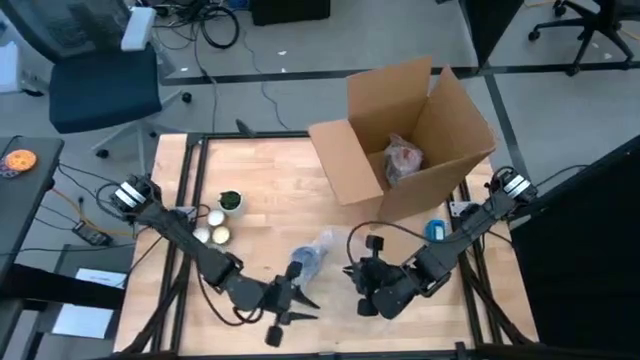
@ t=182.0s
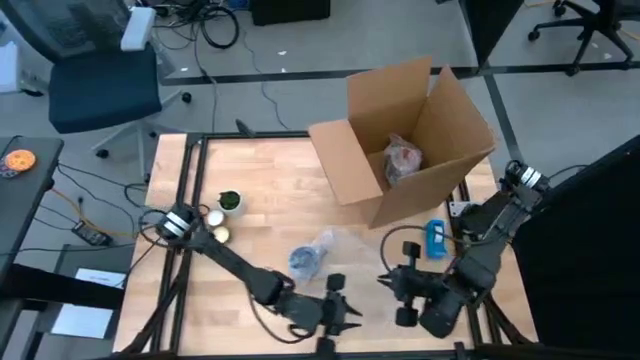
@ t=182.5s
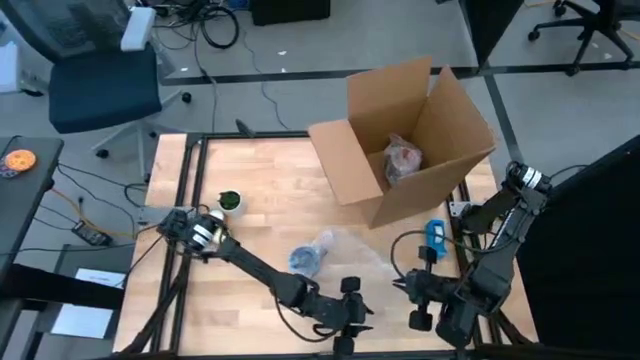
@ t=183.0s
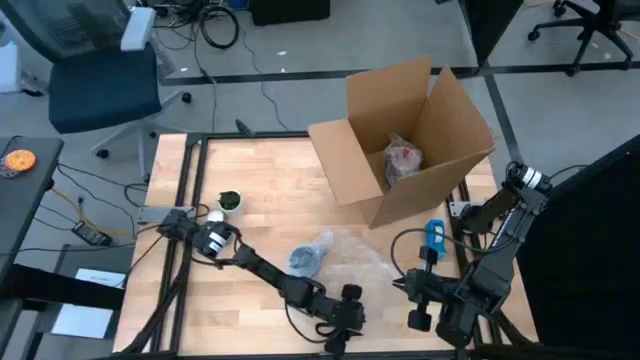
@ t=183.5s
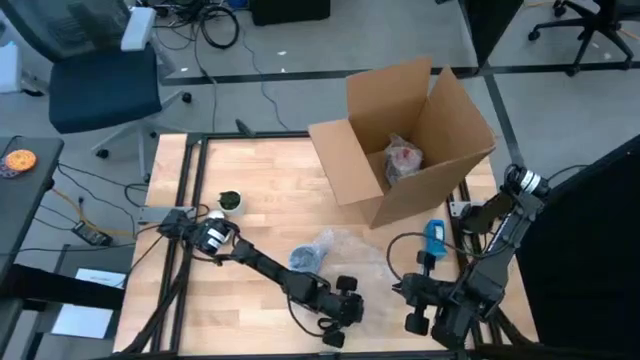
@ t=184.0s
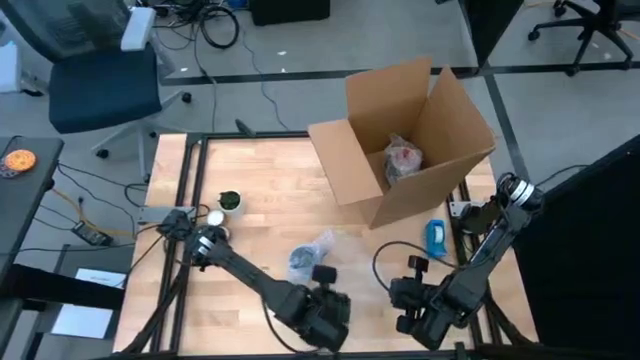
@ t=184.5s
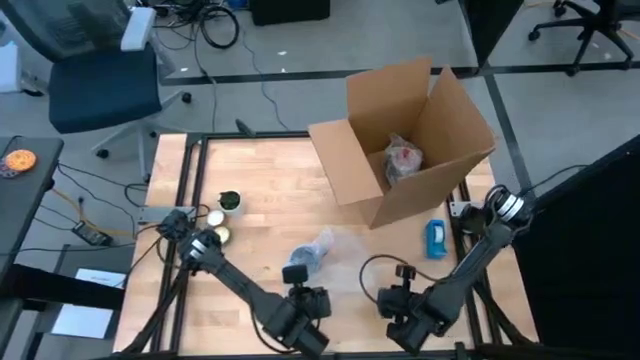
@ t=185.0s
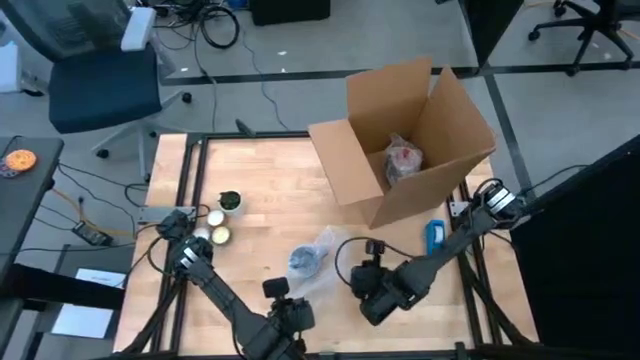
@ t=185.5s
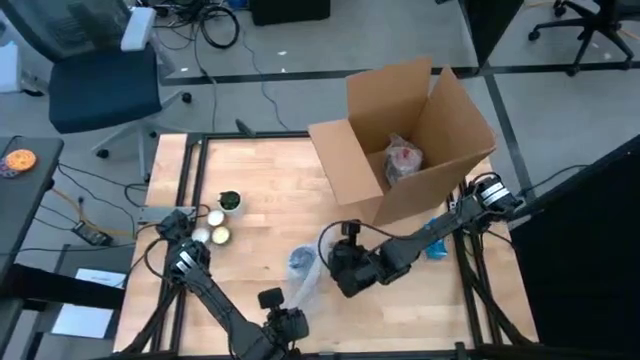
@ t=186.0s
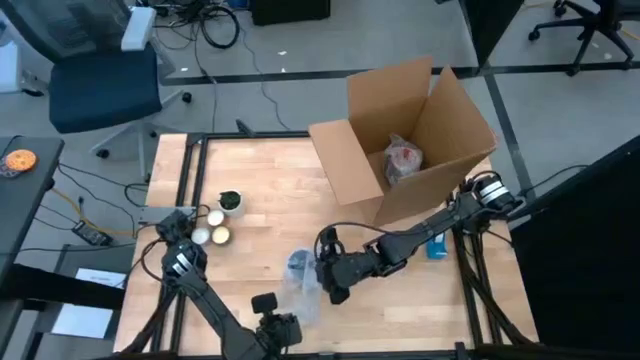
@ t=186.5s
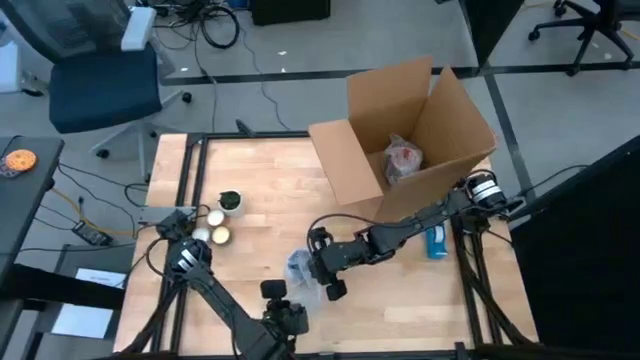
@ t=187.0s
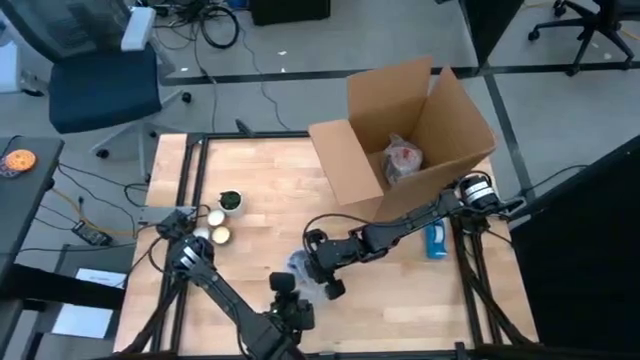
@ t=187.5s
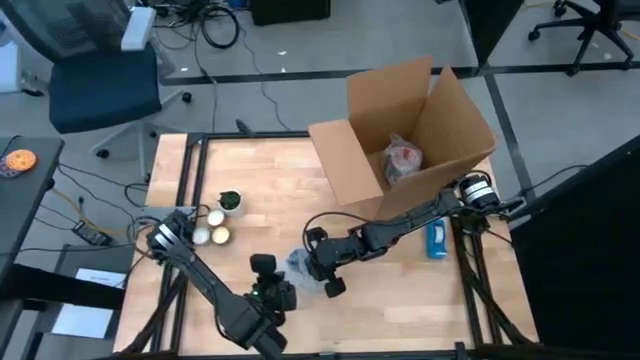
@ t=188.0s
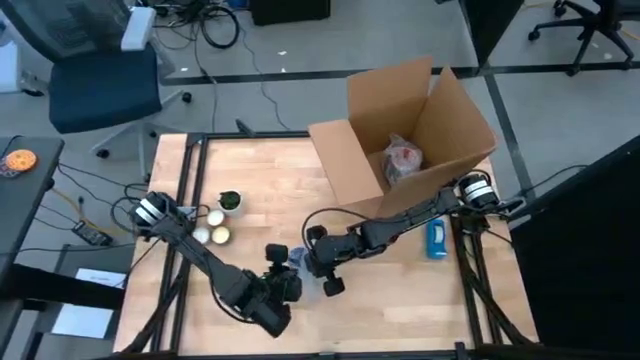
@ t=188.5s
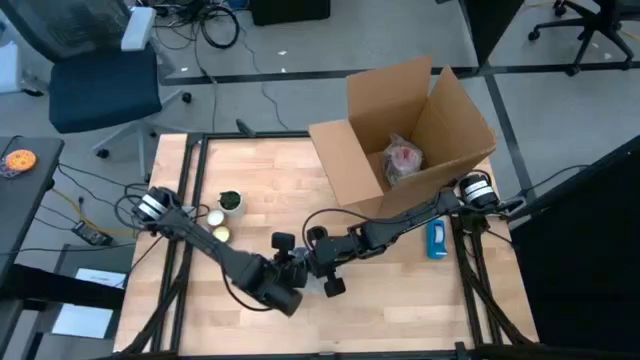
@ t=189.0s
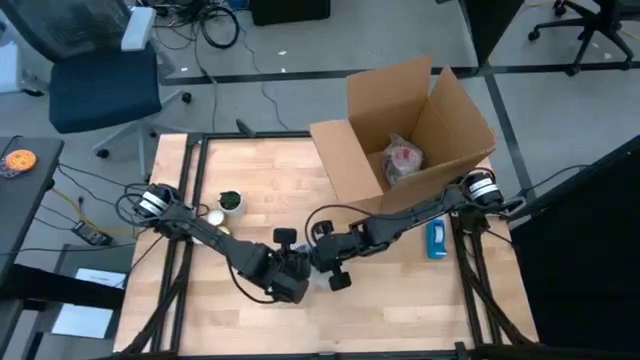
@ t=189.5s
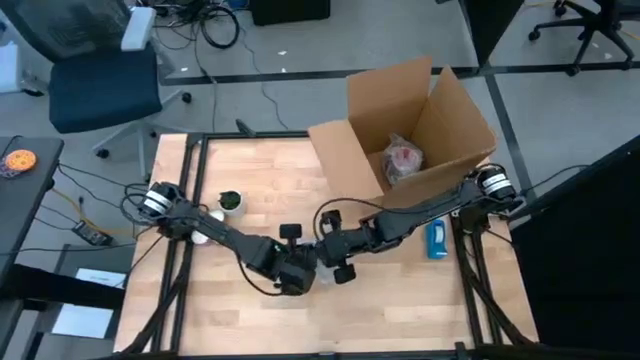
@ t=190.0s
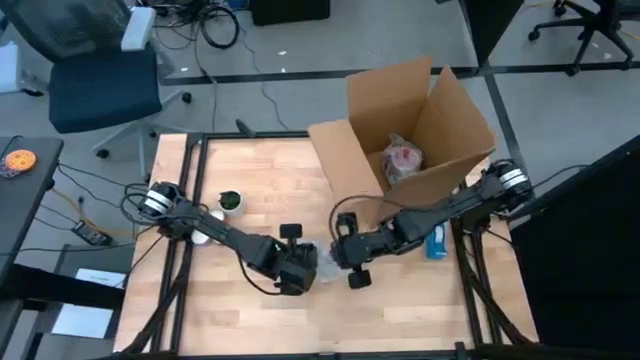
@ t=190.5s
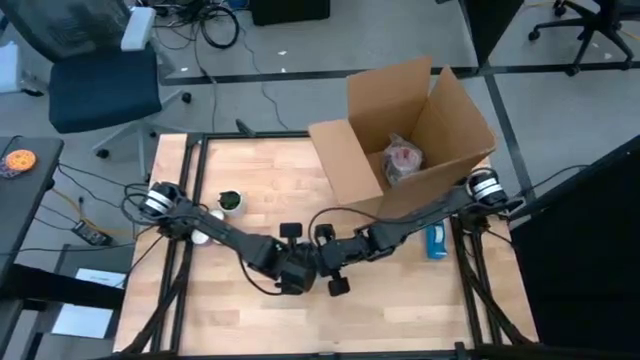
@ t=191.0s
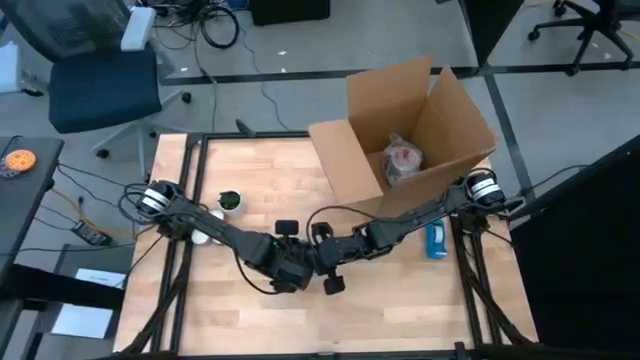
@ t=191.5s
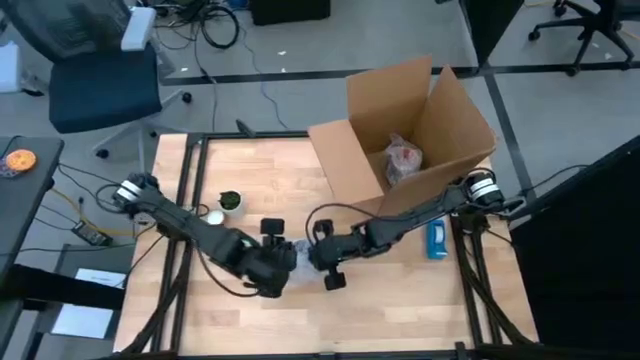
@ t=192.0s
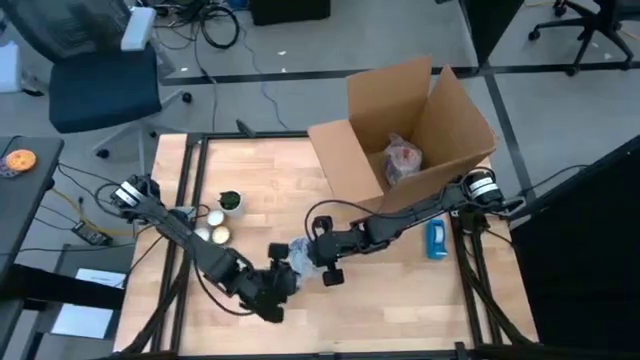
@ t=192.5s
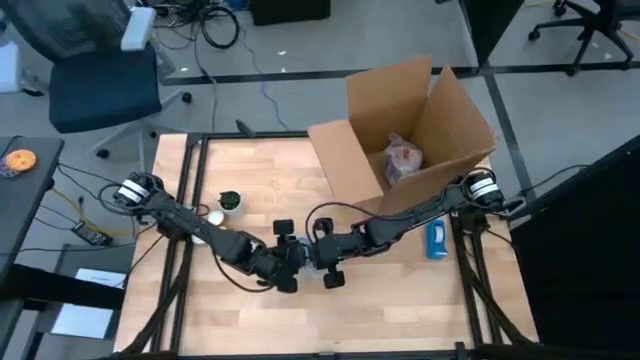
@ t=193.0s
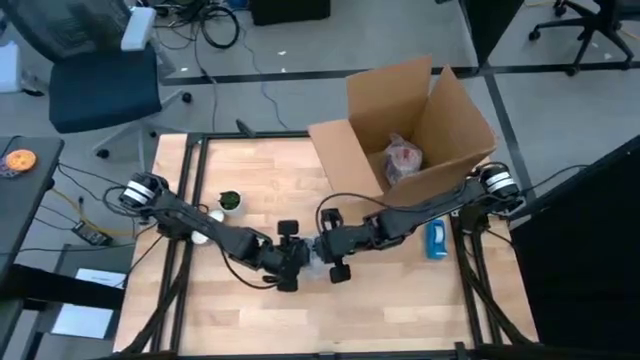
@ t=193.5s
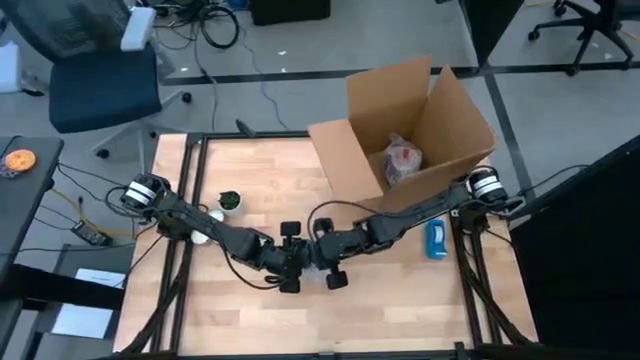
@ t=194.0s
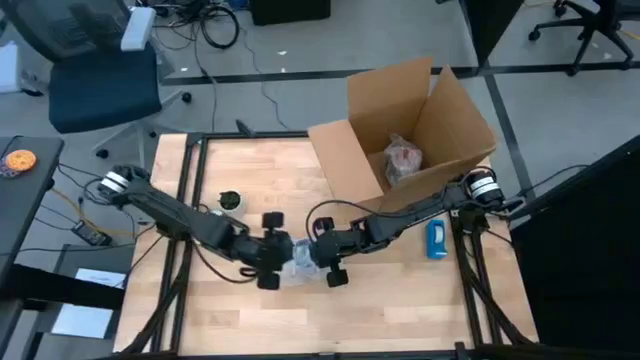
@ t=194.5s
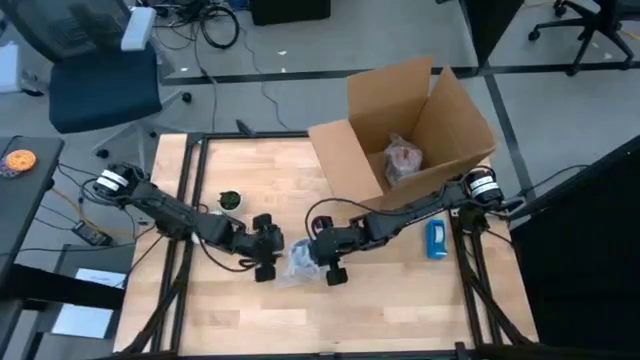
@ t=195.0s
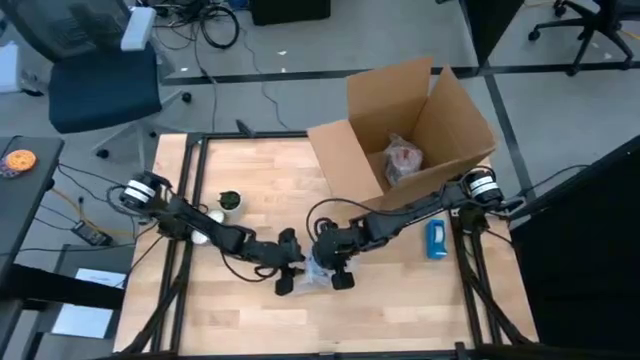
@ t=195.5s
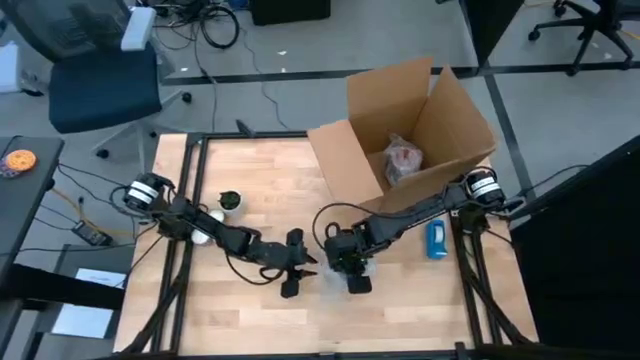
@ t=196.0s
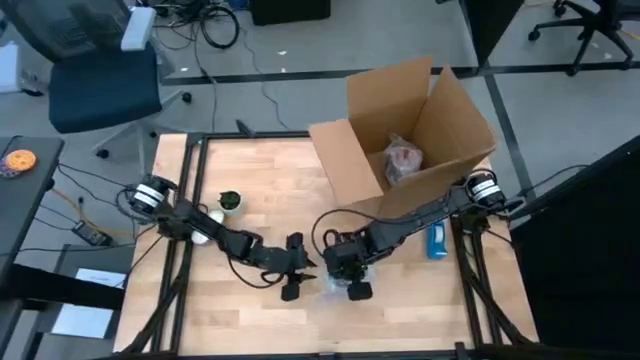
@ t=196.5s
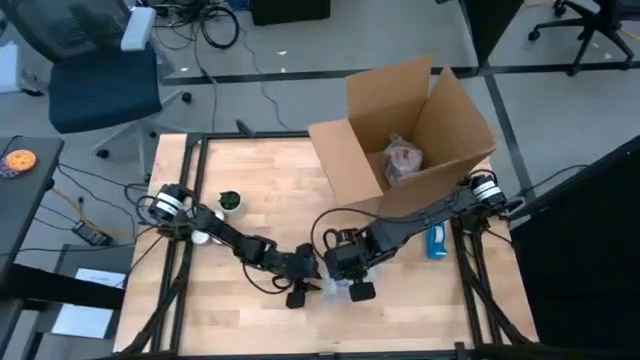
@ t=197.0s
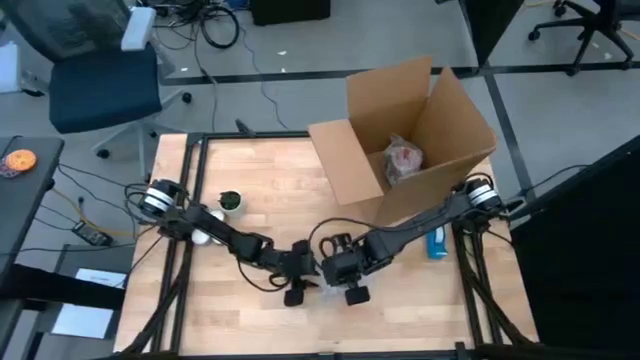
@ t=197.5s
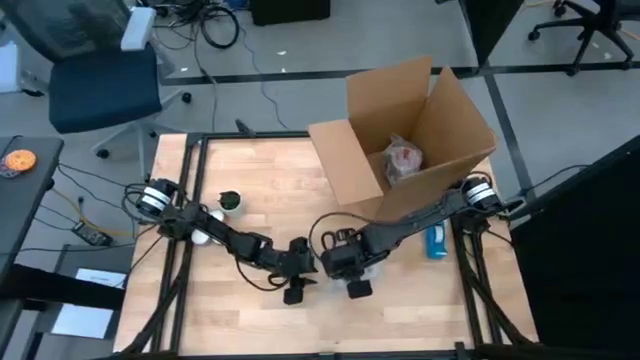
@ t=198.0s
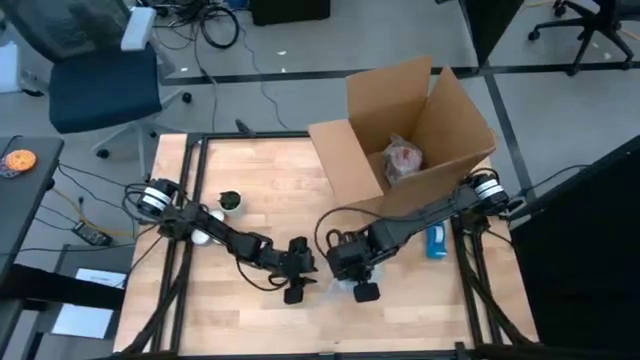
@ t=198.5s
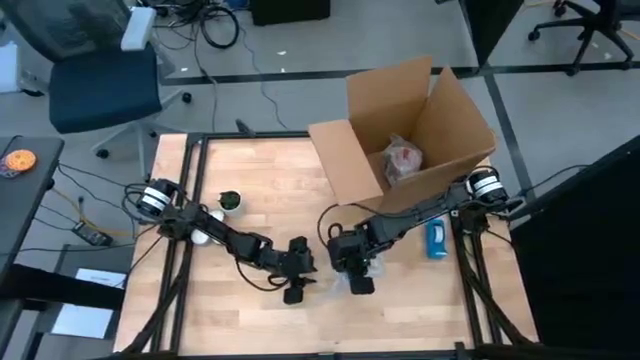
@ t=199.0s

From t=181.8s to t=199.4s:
Task: wrap mug
Wrap the blue mug with bubble wrap

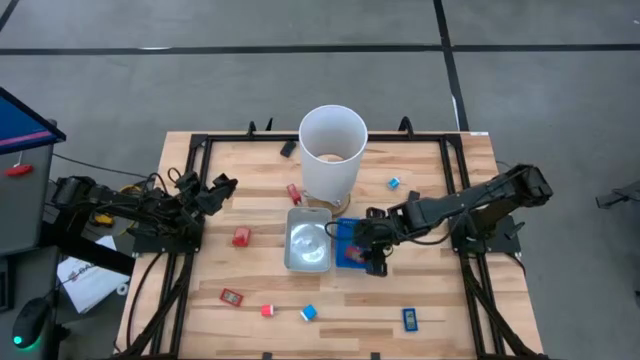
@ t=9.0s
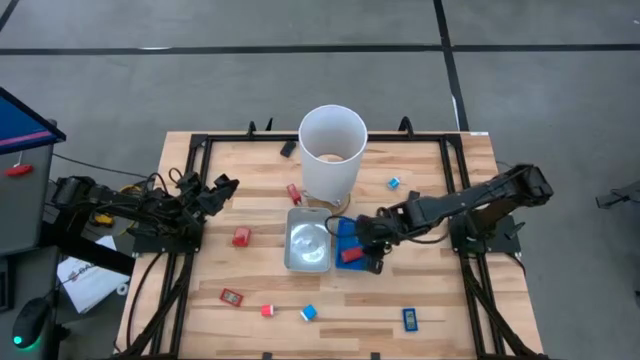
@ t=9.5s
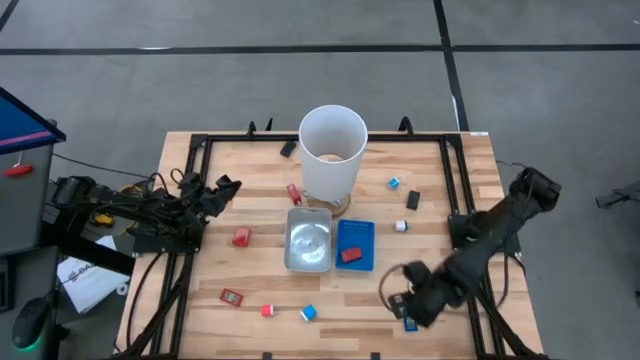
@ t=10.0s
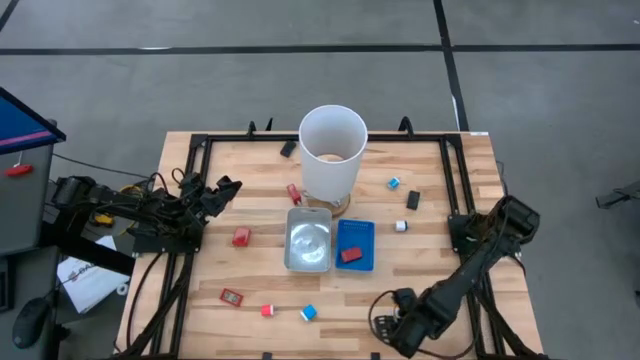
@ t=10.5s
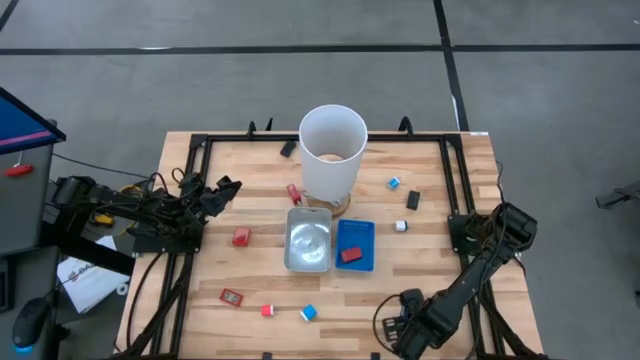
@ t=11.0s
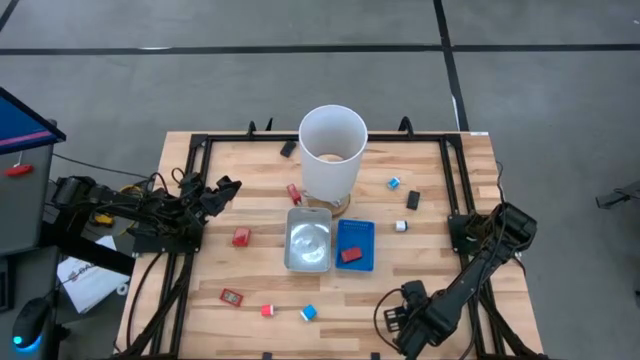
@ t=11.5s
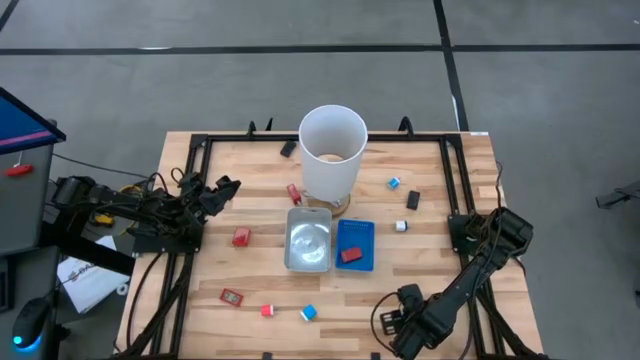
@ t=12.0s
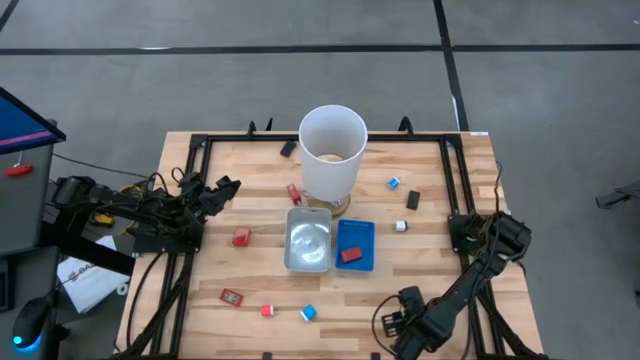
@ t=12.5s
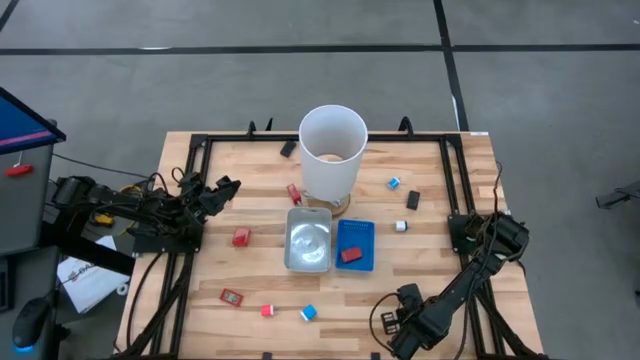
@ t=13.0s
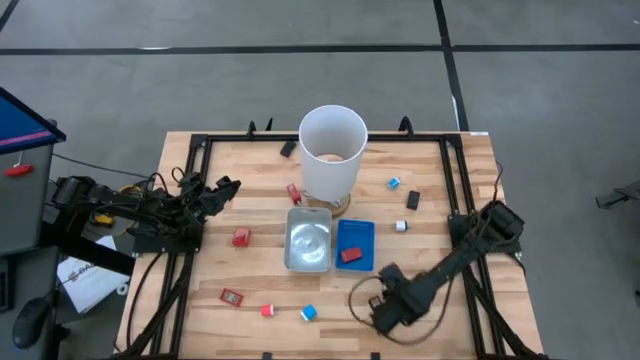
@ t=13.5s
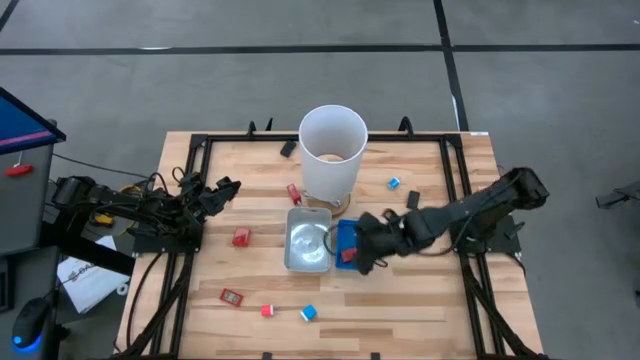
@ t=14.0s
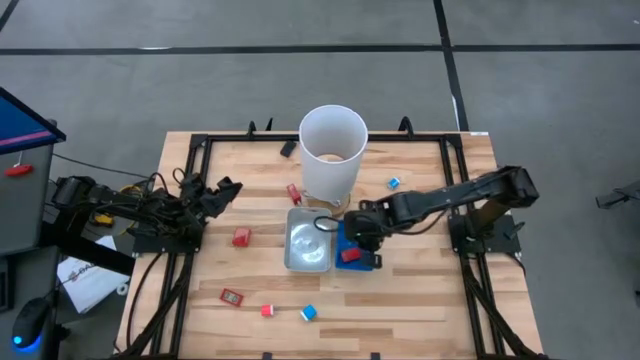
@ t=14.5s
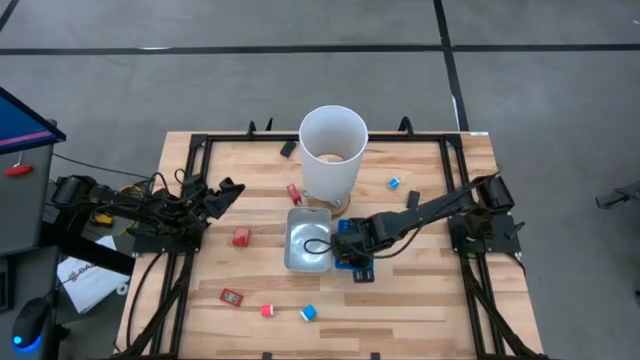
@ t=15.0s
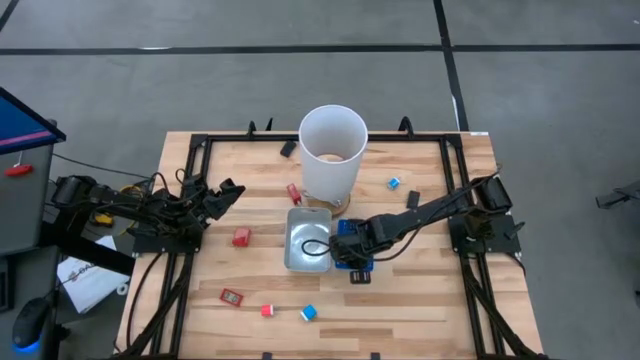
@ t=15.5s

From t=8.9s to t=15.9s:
Task: Pick & Place Office items
Put the blue digital clock into the blue bin
